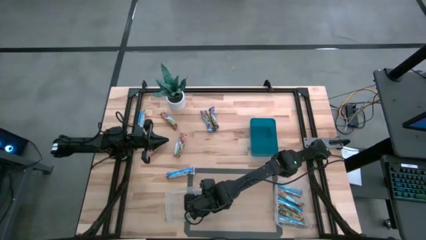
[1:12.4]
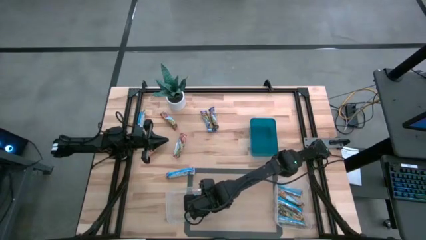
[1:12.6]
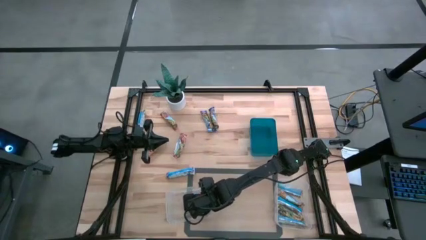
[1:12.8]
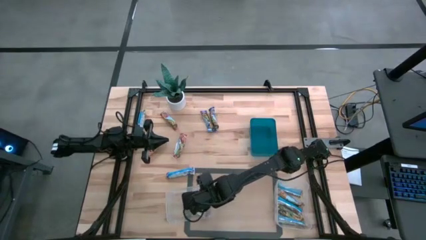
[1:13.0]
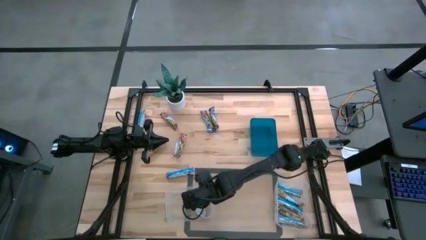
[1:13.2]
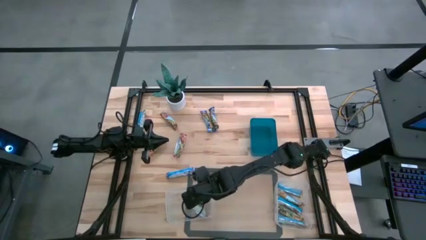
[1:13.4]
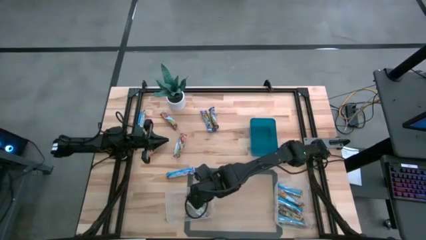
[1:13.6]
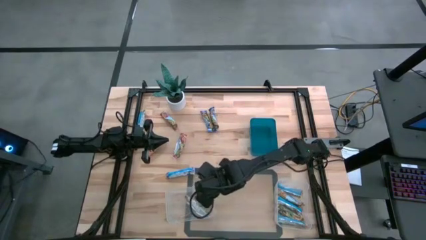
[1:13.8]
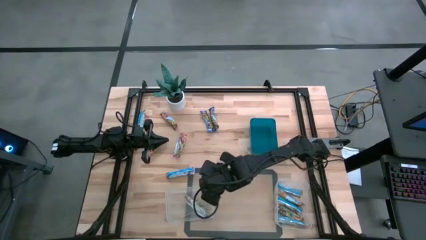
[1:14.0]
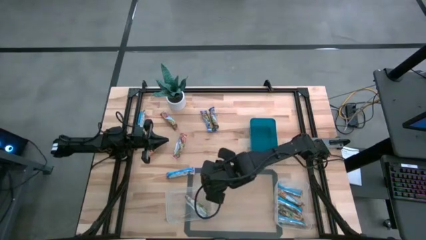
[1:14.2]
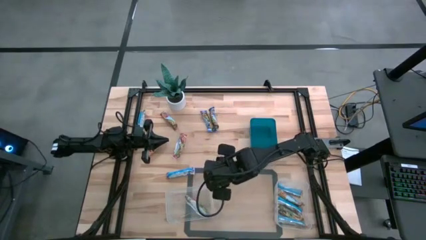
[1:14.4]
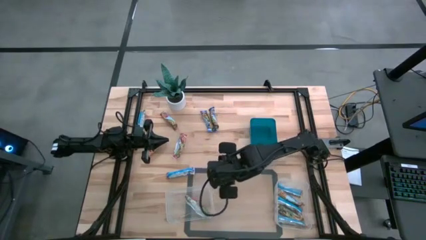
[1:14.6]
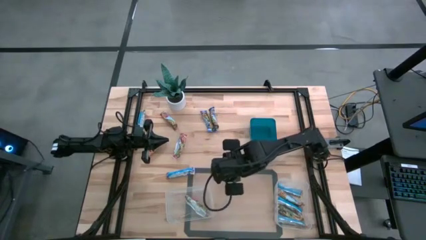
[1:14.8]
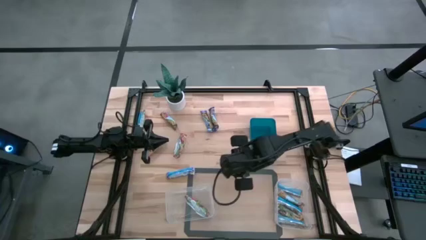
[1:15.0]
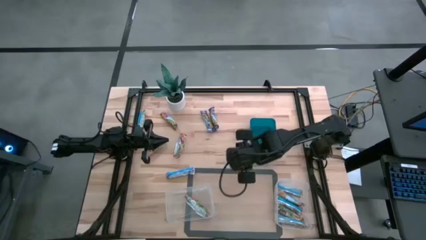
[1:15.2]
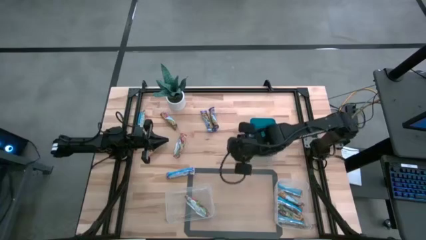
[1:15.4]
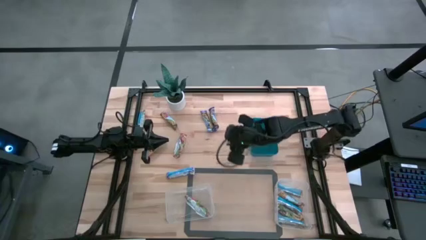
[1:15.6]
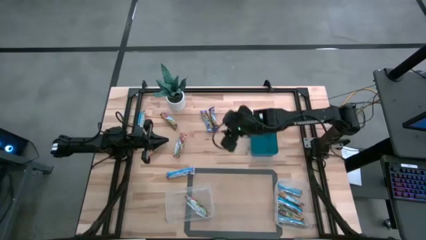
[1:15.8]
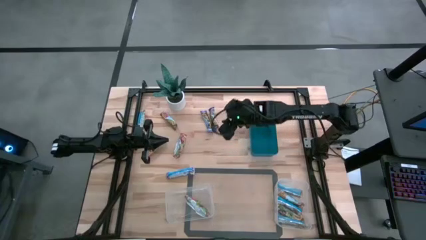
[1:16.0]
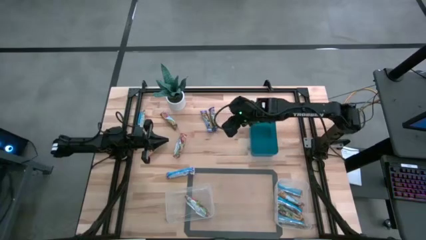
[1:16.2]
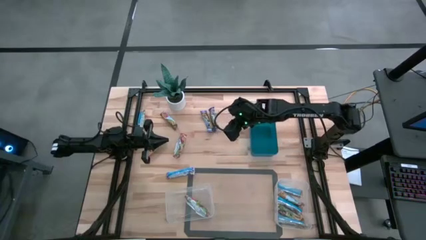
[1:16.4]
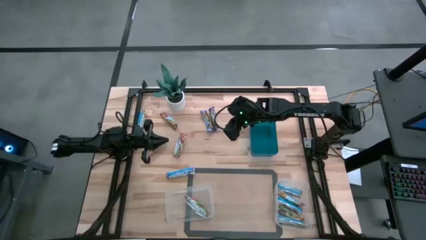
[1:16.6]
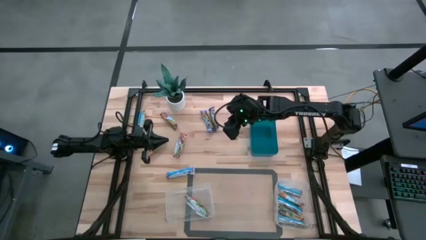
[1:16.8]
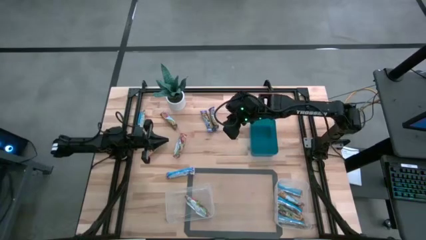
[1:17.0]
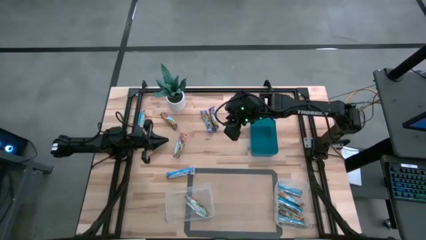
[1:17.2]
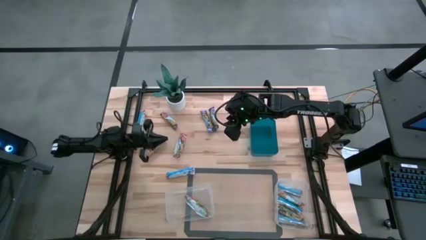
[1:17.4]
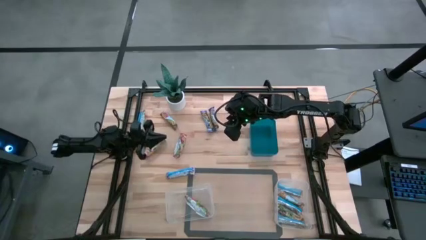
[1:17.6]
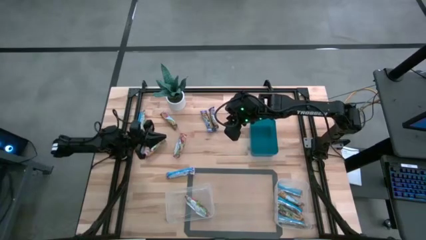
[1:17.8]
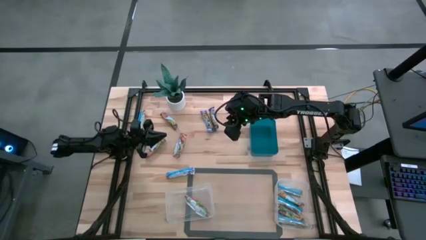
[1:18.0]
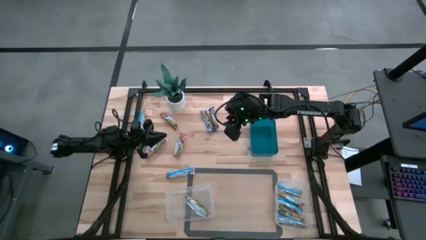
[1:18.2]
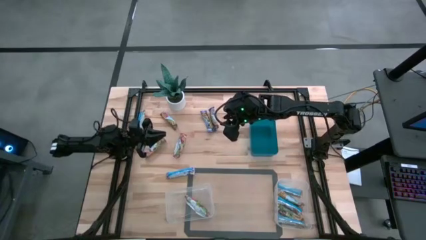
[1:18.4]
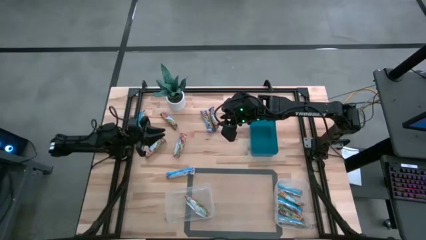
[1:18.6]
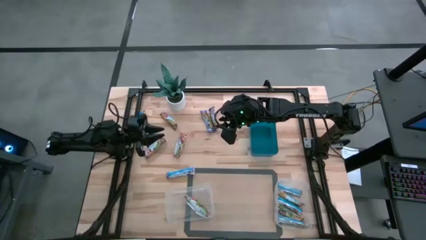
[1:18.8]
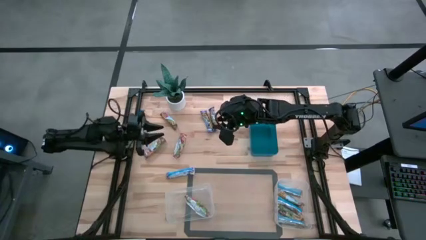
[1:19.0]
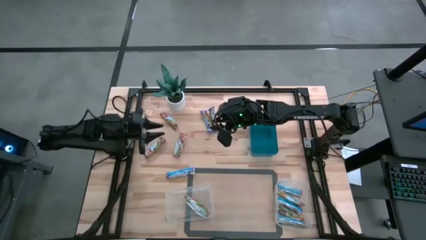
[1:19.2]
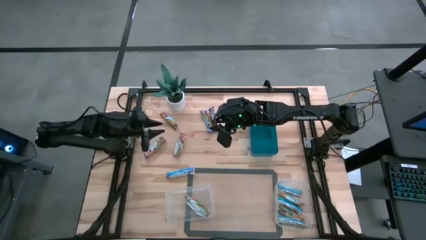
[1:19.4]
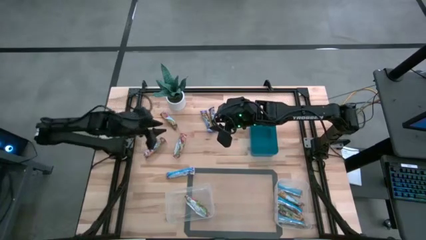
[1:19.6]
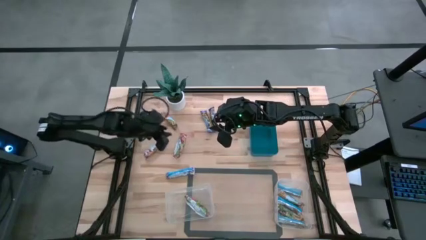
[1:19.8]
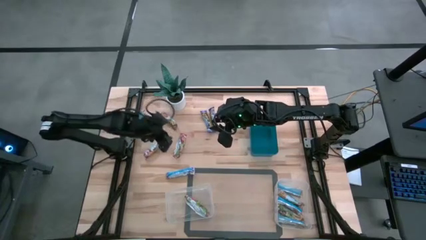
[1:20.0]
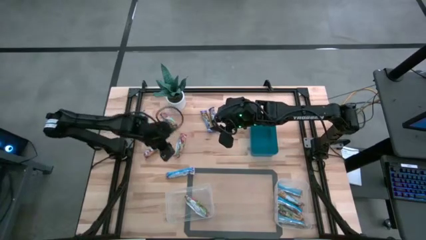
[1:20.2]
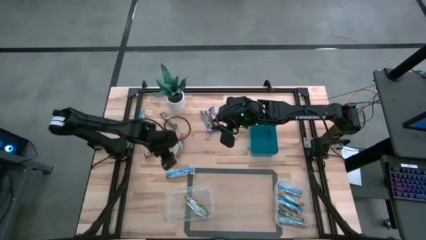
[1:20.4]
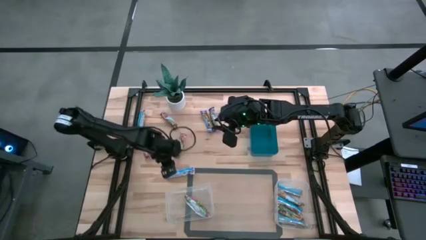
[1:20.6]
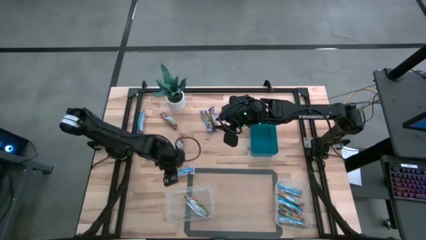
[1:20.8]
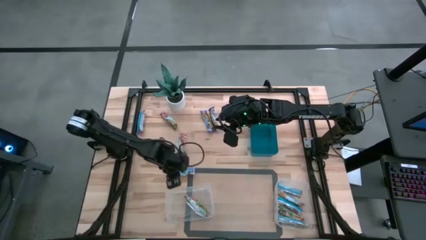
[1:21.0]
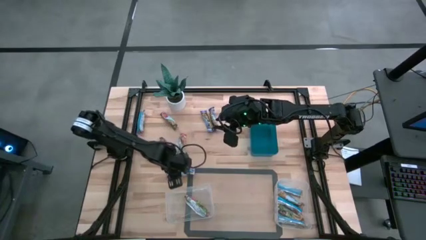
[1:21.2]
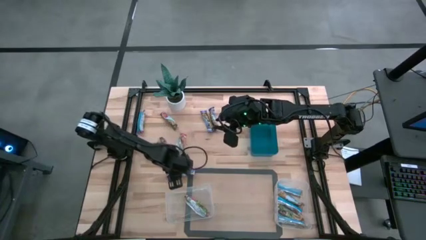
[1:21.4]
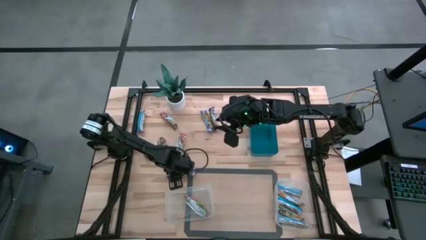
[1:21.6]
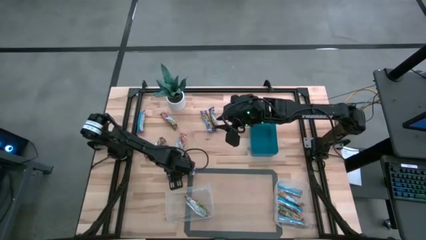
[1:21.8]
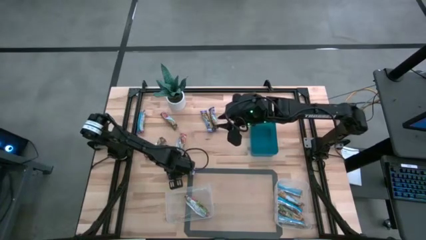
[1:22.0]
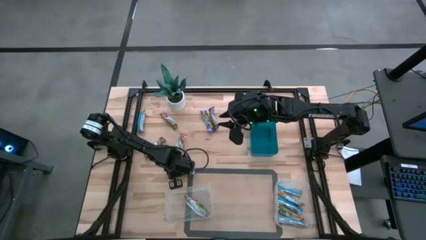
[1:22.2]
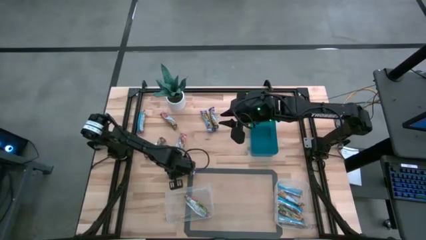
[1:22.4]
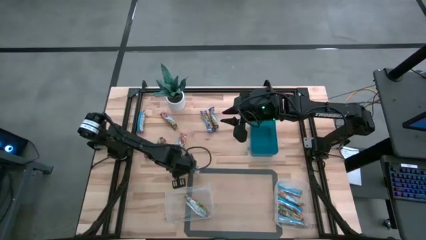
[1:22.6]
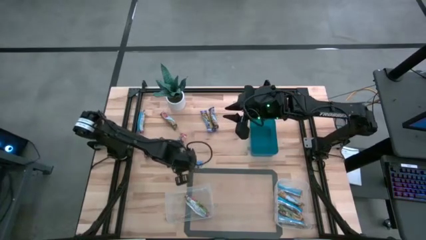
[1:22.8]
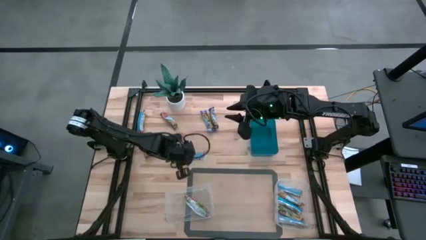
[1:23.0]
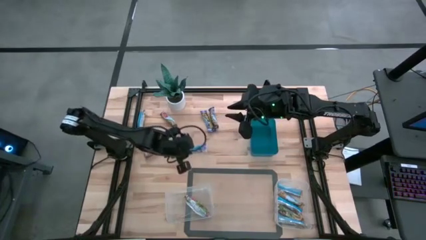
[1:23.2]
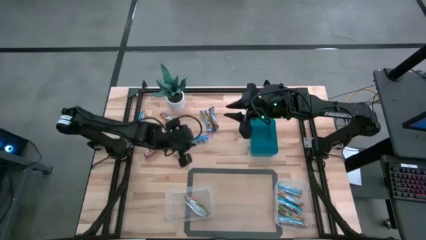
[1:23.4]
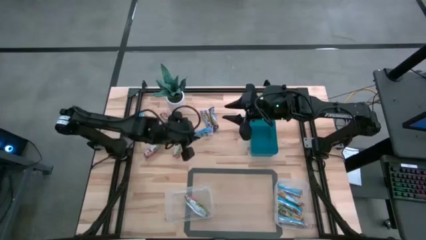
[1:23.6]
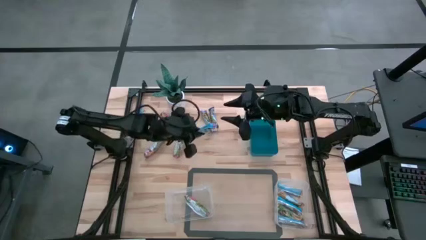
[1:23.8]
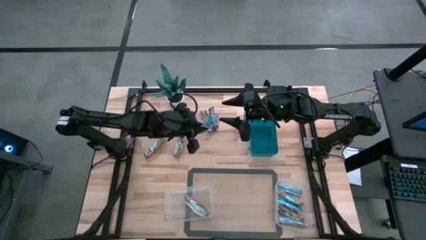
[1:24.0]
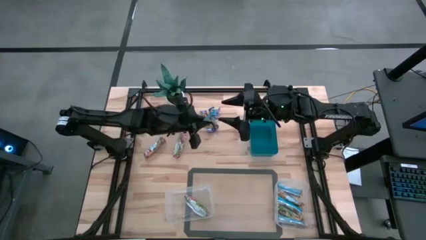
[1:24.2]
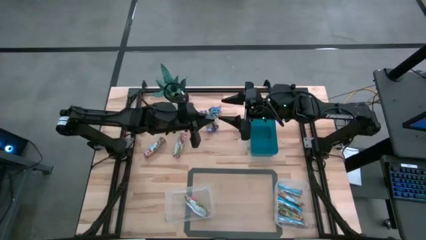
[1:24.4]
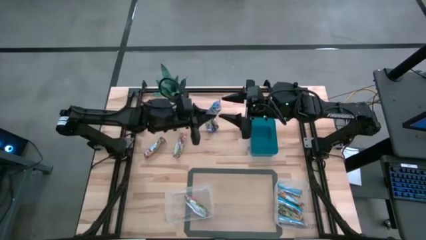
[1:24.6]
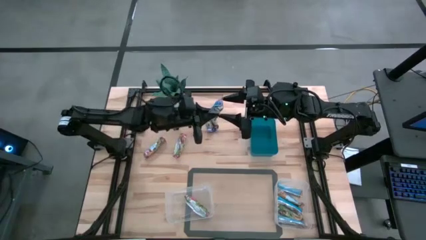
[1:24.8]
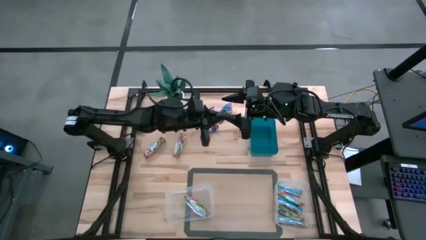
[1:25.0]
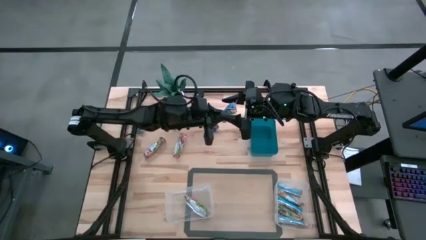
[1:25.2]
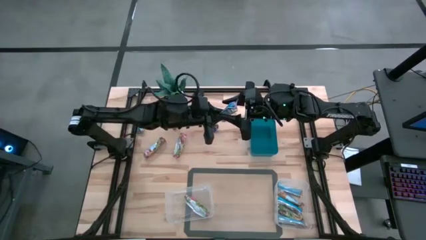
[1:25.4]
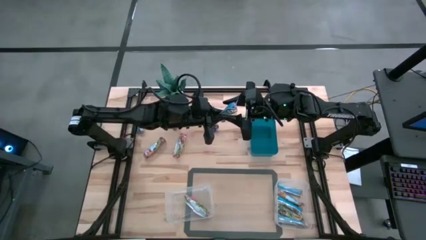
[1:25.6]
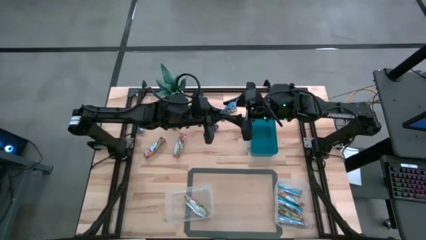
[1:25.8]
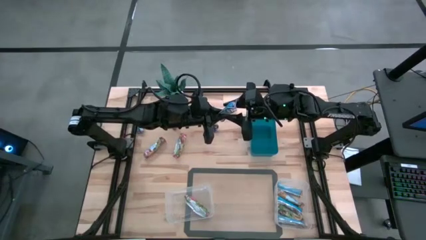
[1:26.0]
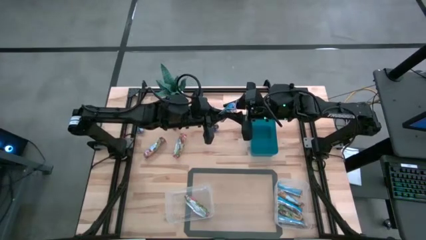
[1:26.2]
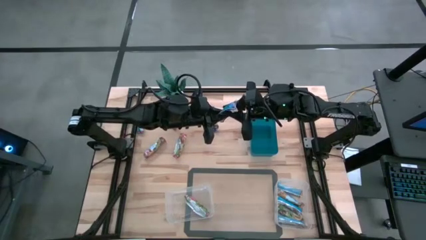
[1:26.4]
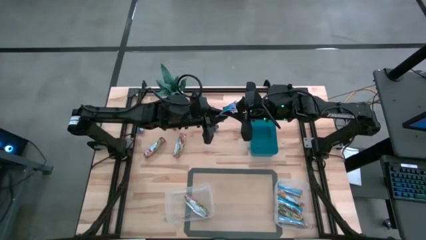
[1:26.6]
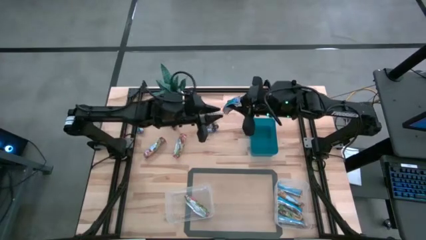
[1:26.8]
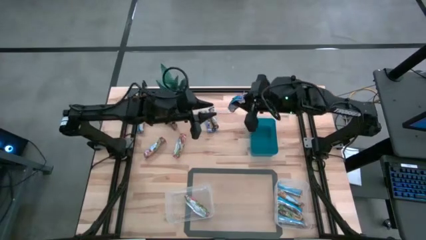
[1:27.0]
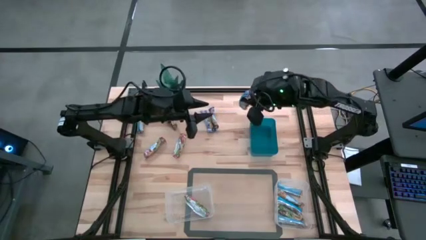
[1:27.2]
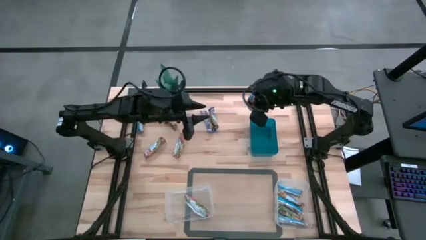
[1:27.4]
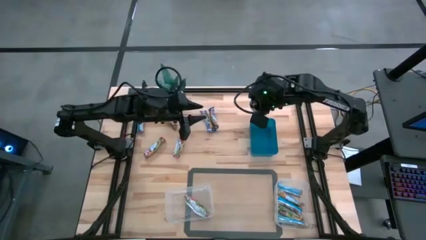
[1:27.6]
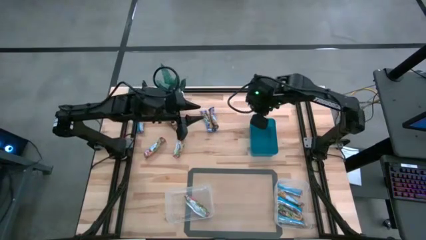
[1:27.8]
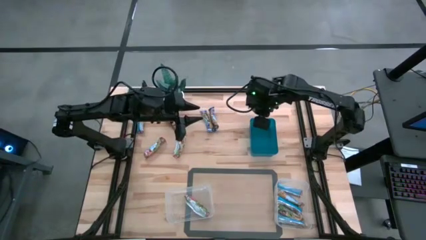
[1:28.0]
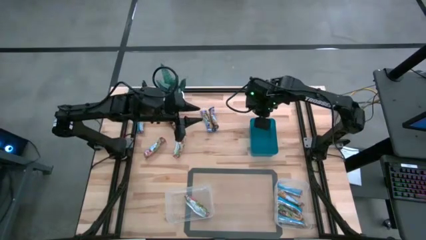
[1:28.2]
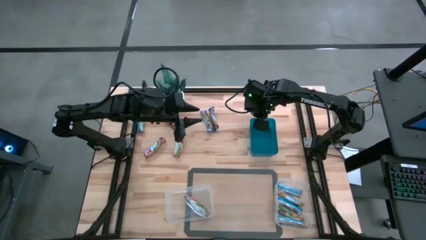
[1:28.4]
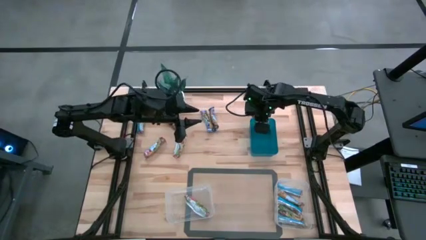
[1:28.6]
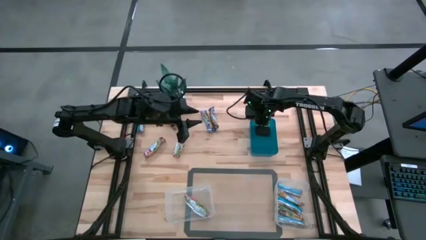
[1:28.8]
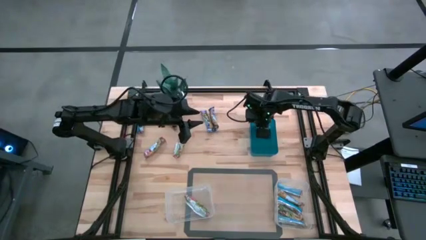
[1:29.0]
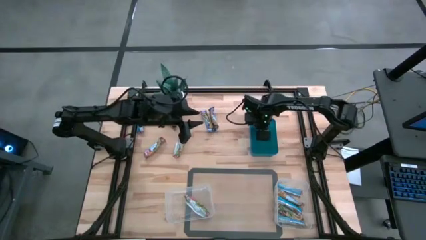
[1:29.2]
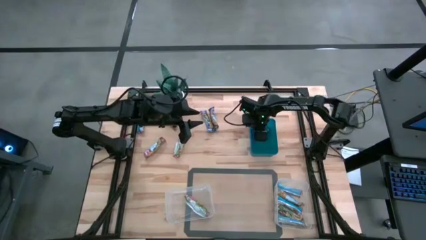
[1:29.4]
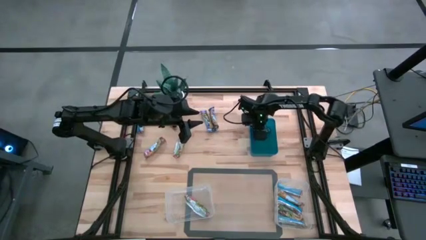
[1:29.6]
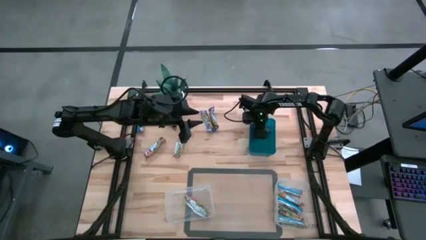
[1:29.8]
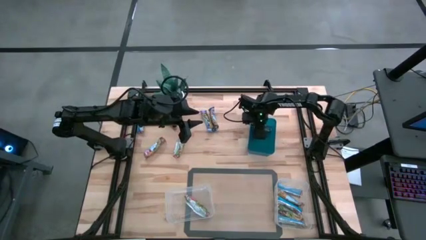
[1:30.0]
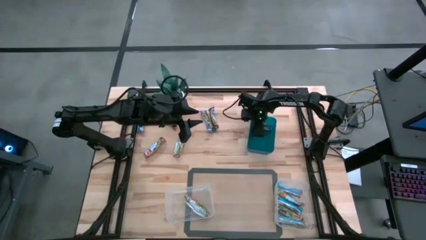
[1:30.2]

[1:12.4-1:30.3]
Task: Pick and place Granola Bars by type
Put the bottom left blue granola bar into the blue bin
